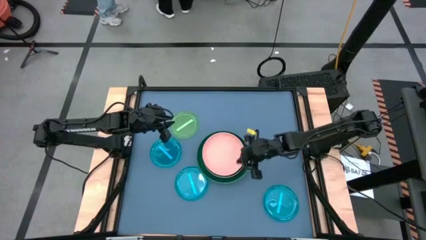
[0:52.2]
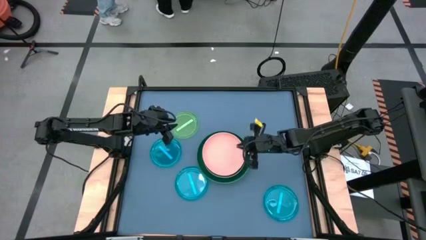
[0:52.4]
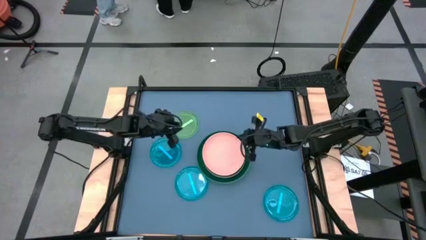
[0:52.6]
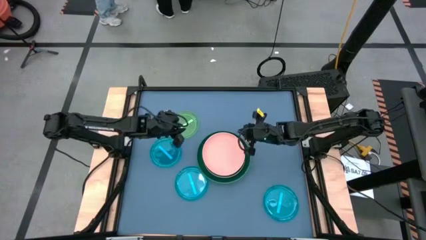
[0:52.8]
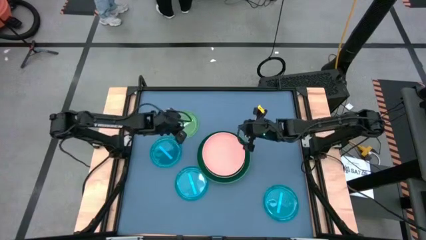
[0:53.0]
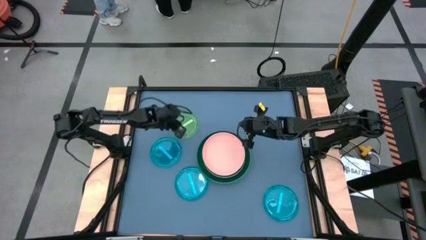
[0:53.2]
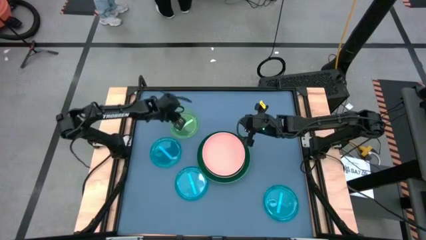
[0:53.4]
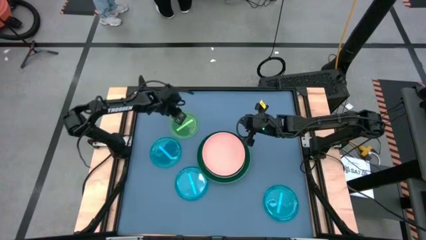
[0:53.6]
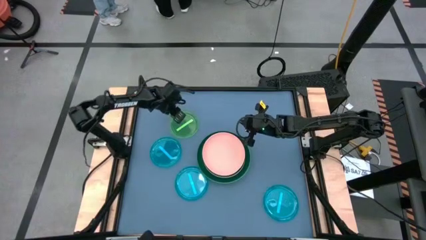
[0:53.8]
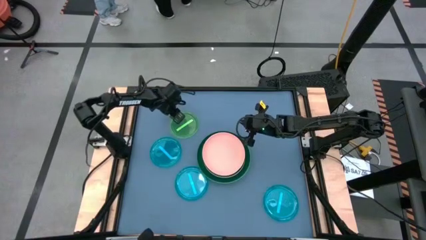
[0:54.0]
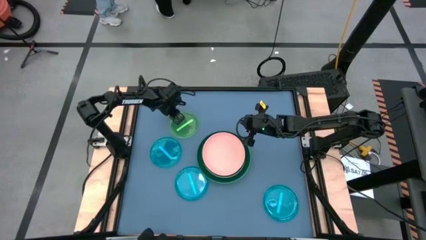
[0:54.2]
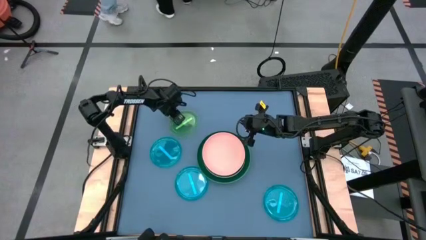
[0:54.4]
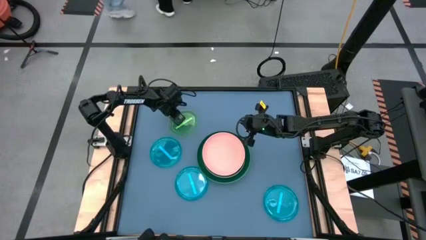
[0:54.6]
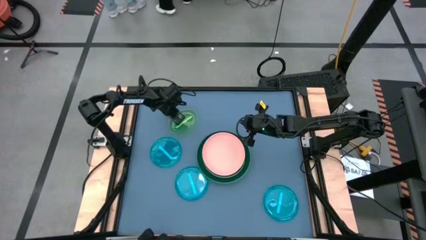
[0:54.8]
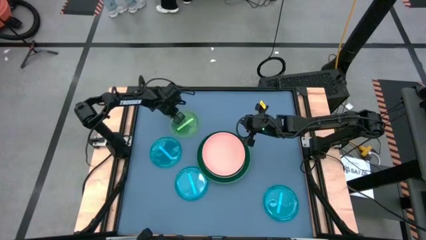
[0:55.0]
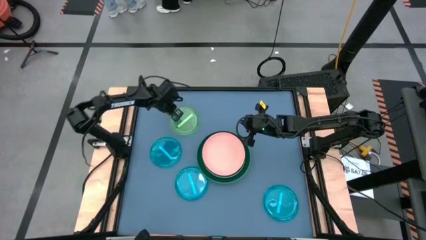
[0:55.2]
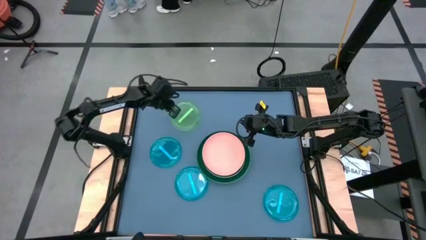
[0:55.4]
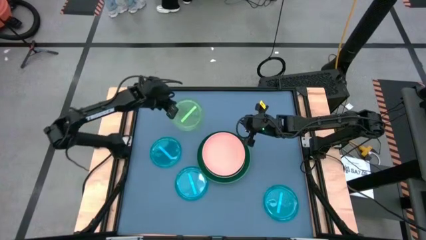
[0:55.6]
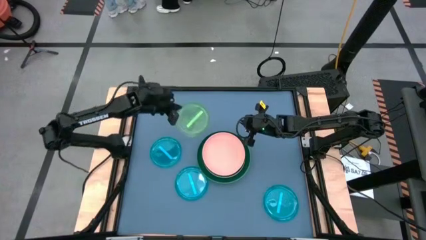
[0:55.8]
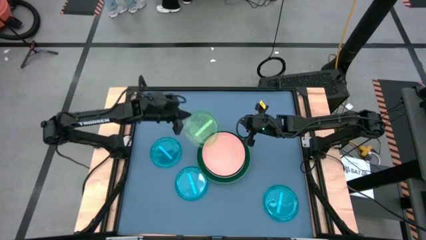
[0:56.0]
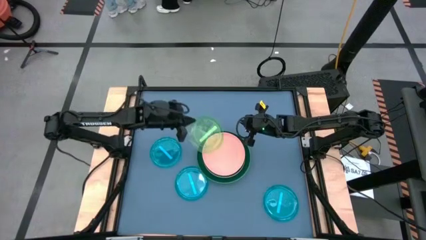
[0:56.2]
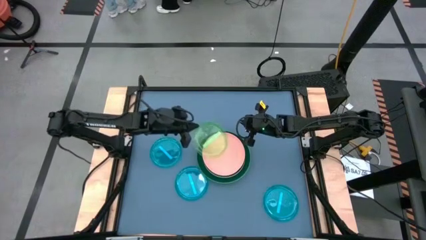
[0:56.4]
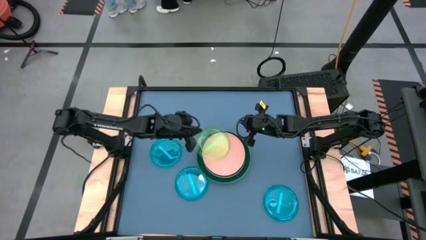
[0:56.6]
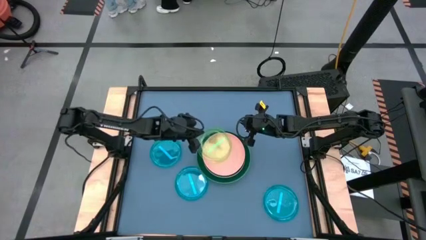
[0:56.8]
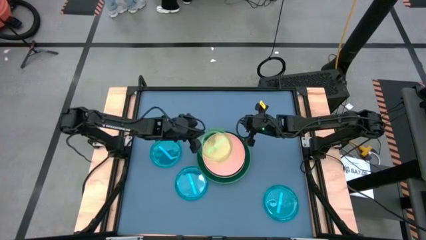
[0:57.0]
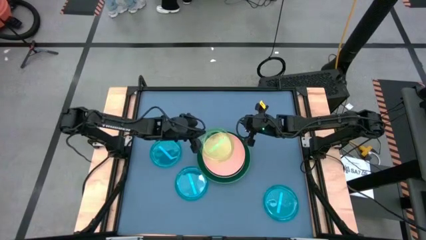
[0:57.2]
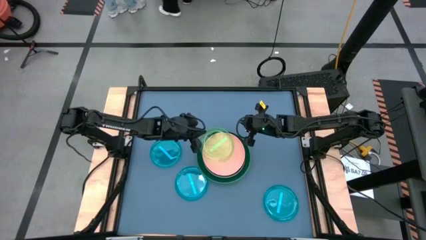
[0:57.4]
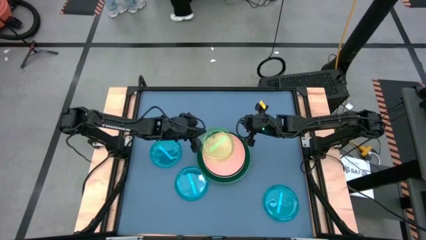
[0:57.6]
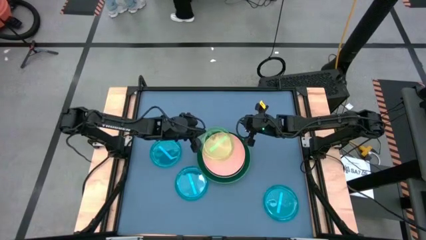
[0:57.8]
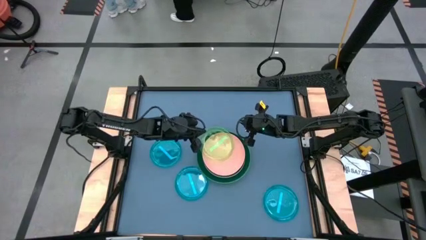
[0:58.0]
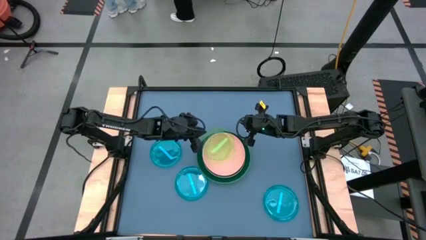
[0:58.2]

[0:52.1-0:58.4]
Task: Stack plastic plates
Stack the light green plate on top of the pink plate

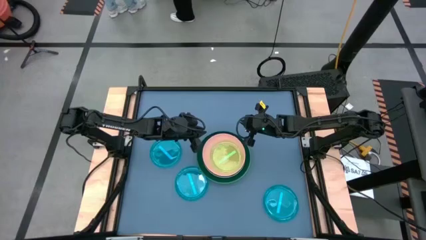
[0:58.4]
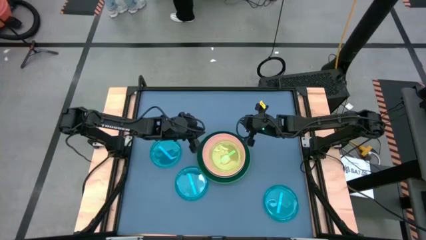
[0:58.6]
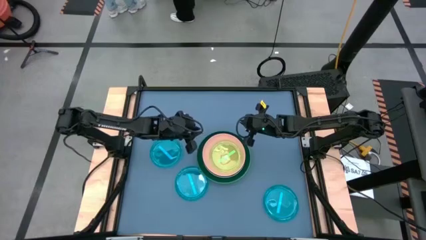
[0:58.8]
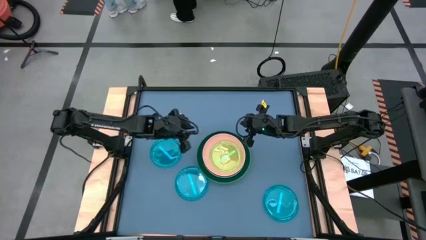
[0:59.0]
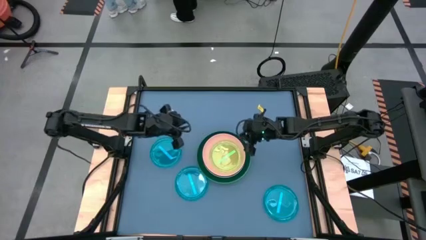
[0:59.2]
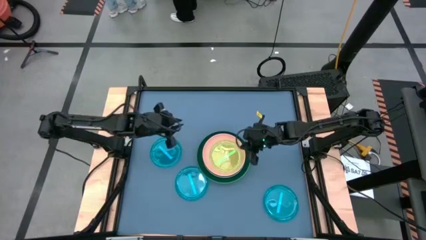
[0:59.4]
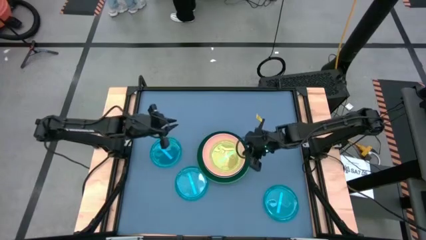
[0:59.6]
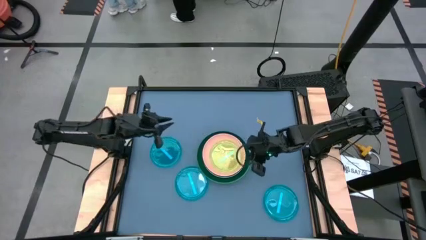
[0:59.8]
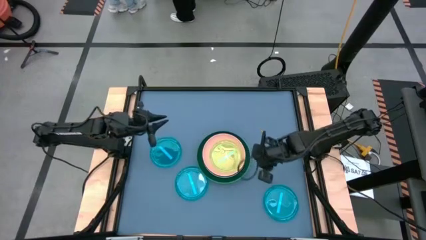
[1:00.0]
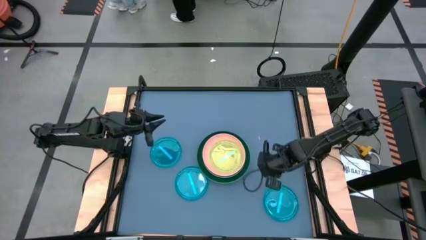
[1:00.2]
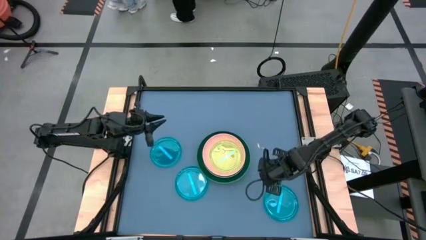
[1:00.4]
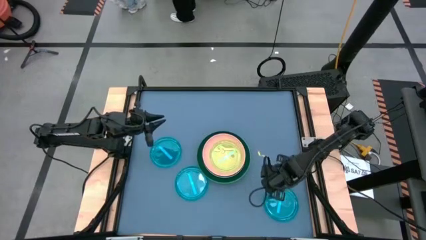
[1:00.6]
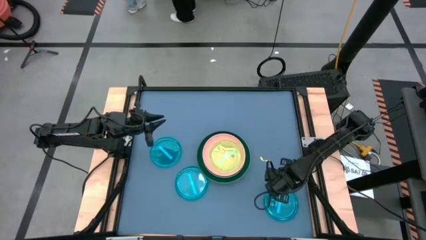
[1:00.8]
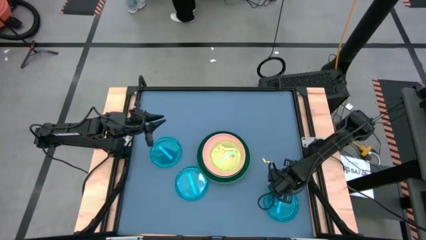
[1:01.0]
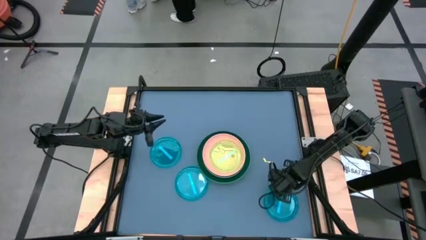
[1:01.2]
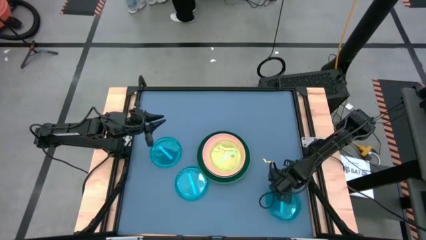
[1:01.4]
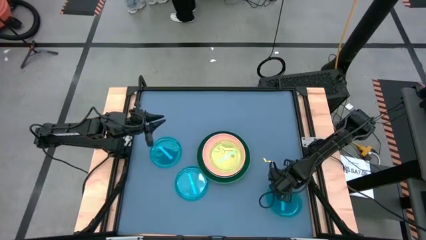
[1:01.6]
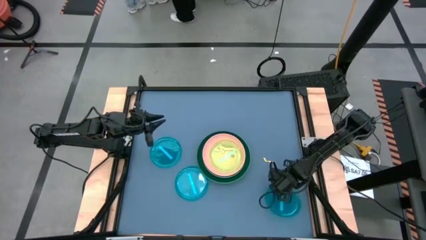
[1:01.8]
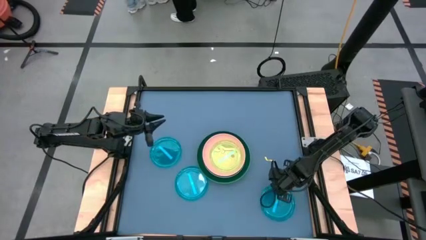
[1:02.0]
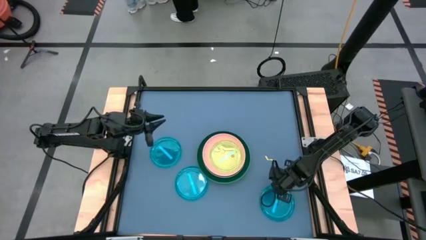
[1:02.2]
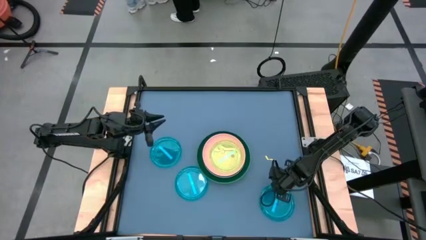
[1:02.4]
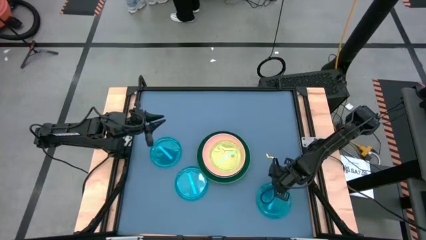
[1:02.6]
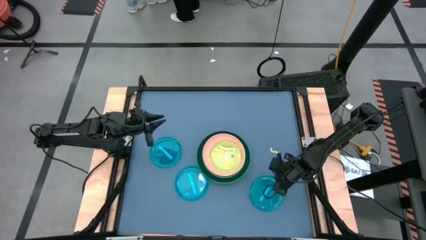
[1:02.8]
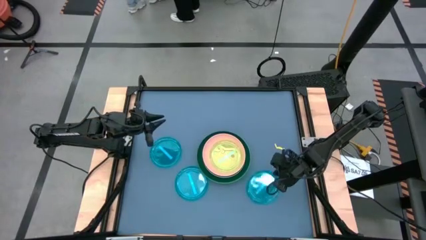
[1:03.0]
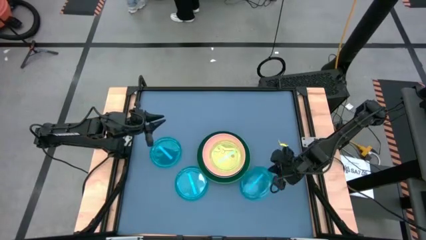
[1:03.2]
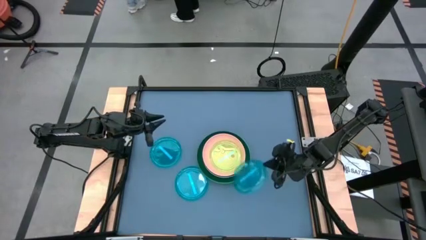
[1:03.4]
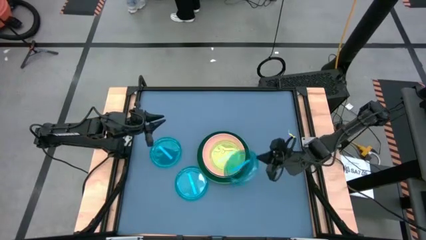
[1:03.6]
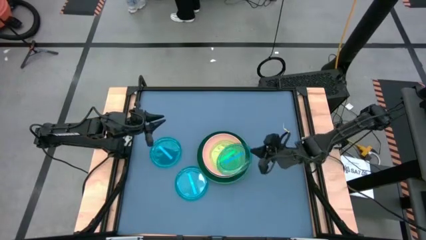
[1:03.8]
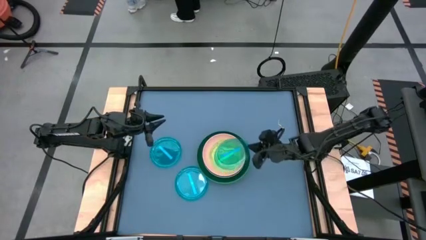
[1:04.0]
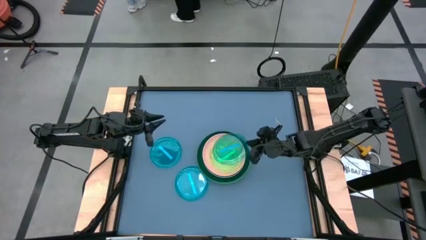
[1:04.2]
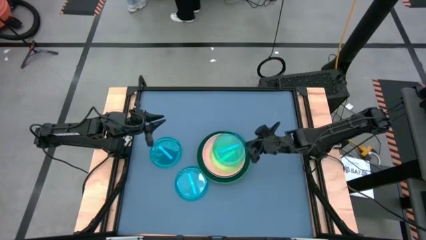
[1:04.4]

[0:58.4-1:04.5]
Stack the right blue plate on top of the light green plate

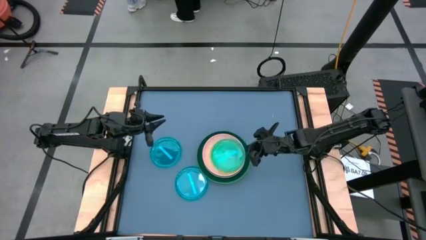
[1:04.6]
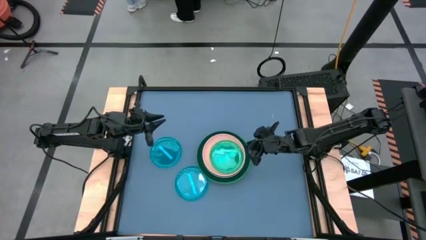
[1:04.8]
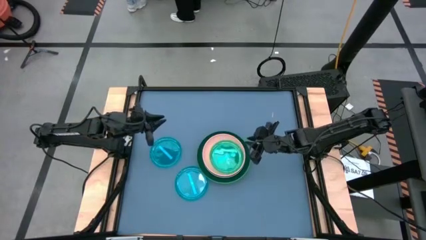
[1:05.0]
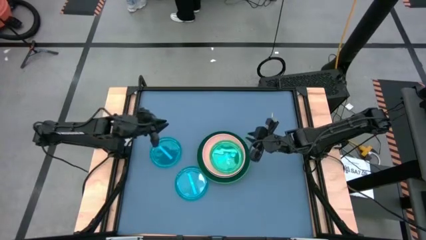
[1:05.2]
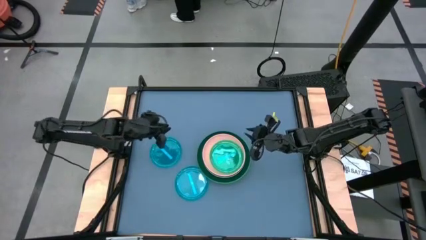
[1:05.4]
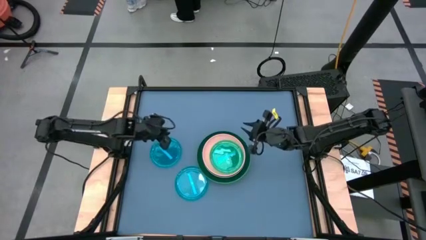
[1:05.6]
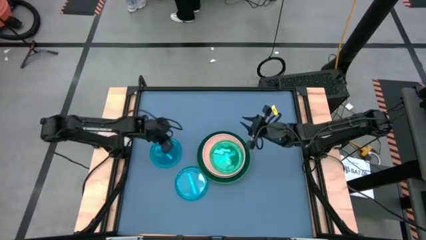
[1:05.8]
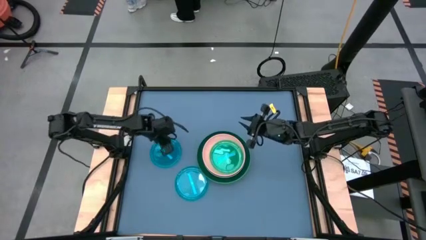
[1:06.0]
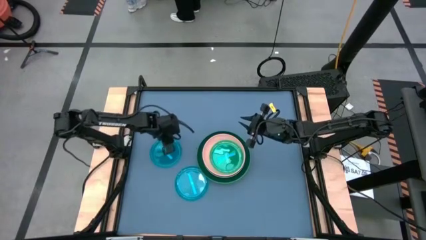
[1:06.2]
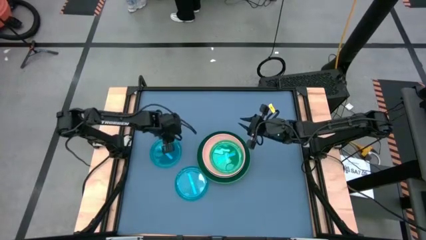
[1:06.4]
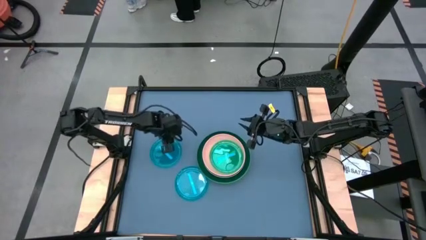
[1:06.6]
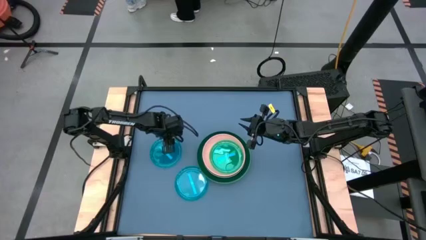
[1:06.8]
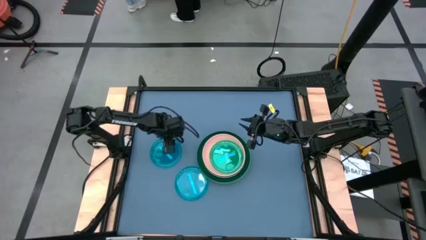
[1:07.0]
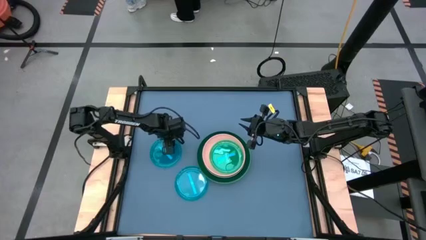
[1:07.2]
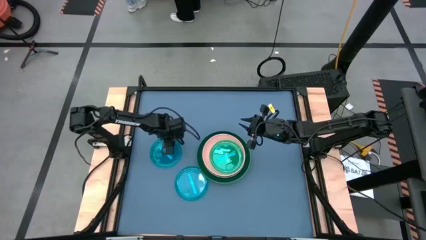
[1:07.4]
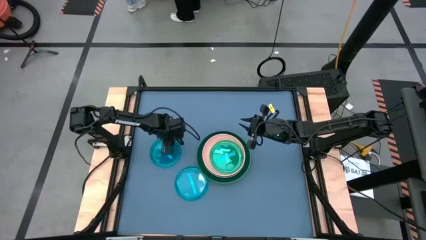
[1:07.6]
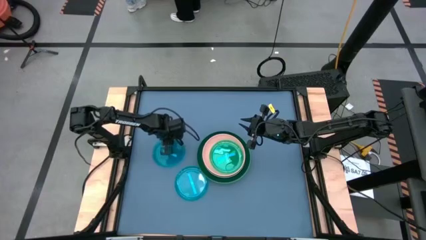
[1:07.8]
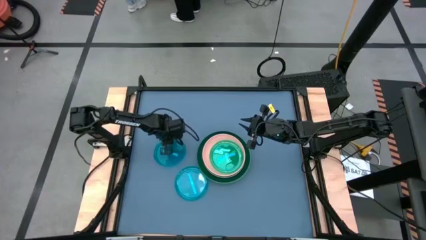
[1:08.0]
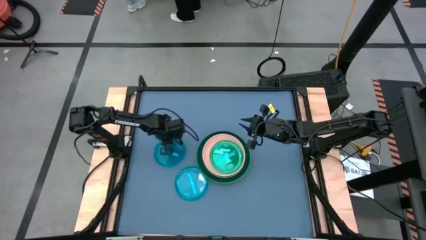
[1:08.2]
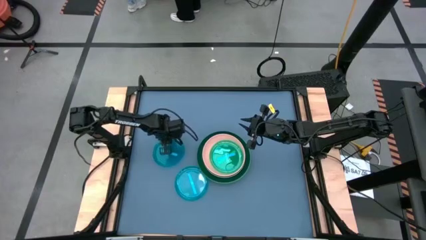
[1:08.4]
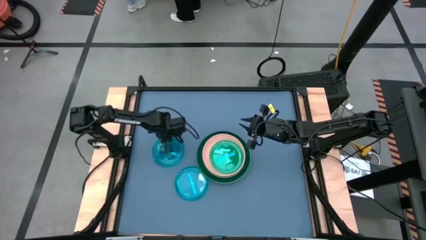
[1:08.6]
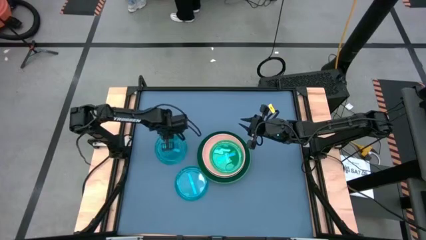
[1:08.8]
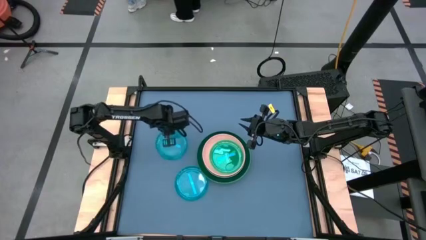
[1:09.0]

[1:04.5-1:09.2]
Stack the top blue plate on top of the blue plate

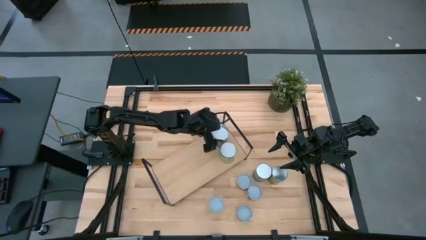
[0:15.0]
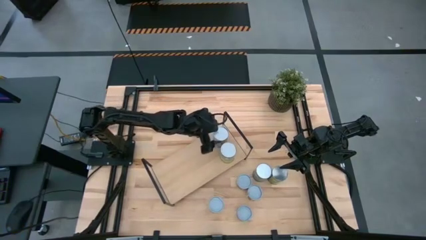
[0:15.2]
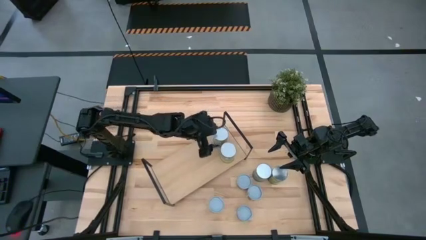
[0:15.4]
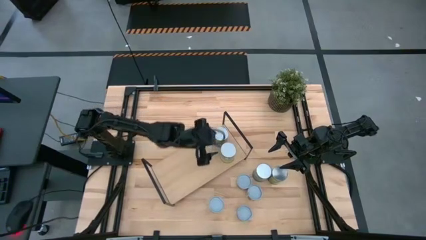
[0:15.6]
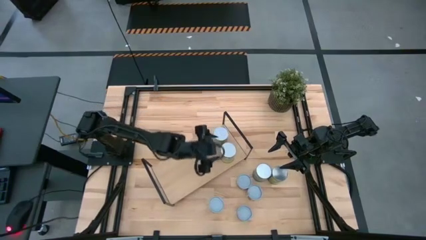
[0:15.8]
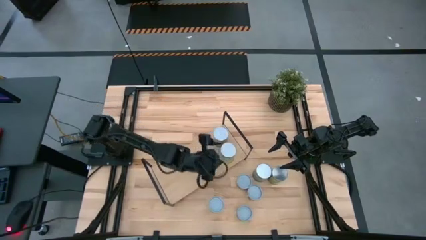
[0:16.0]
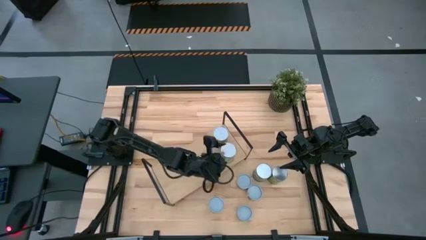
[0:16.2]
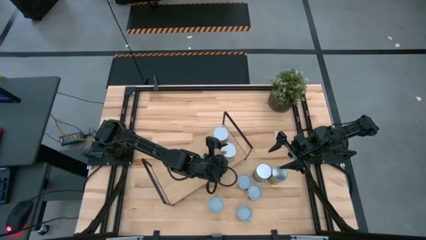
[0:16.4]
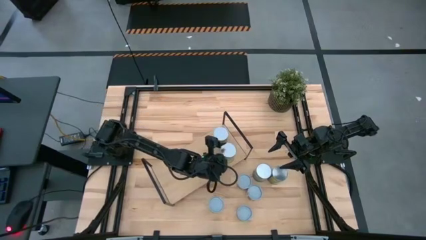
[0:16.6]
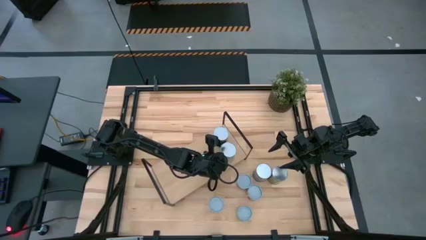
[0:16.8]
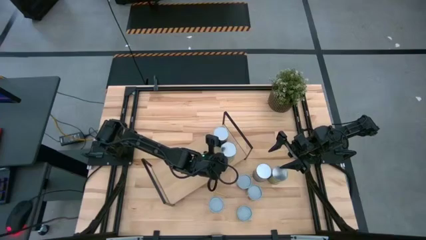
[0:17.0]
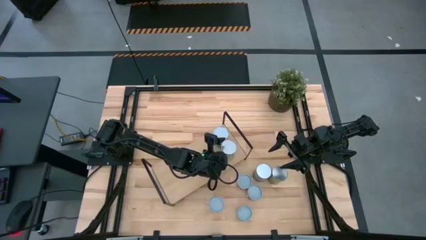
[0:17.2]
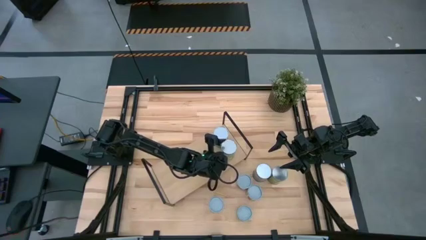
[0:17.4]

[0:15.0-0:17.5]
Task: Pick and place cans onto a shelf
Adjust the large canned carrots on the shelf
